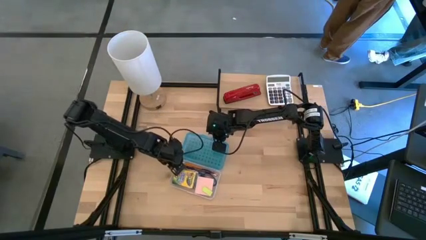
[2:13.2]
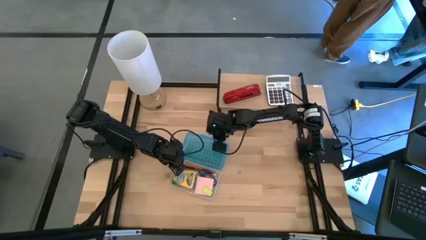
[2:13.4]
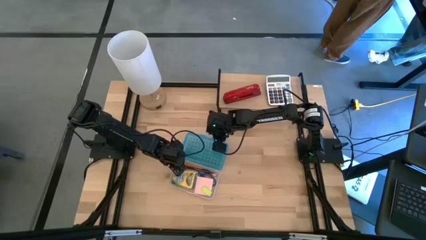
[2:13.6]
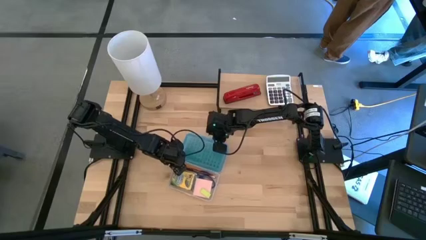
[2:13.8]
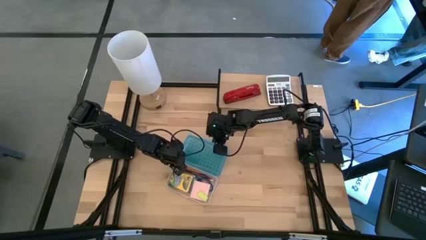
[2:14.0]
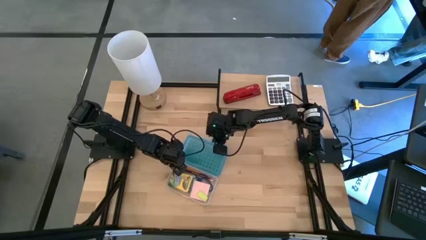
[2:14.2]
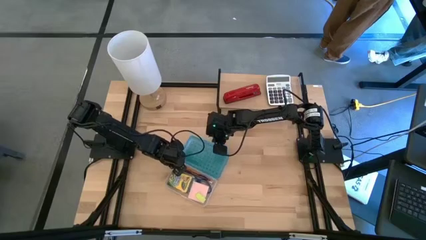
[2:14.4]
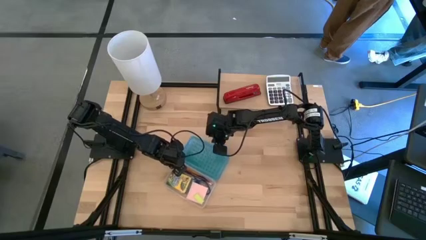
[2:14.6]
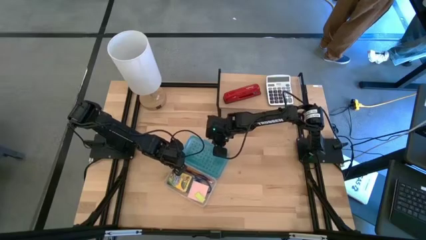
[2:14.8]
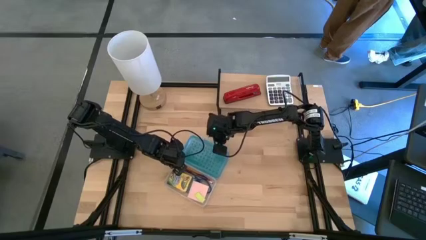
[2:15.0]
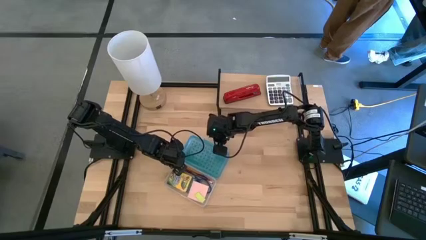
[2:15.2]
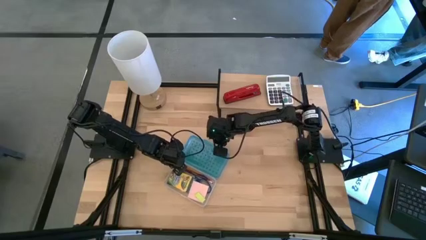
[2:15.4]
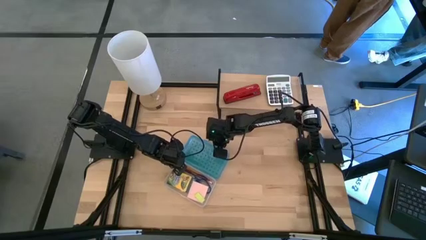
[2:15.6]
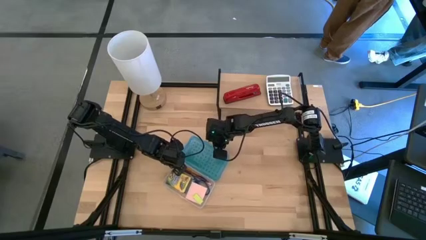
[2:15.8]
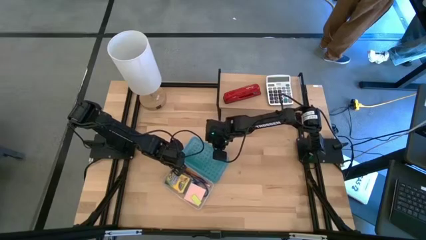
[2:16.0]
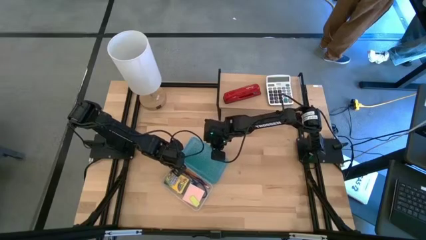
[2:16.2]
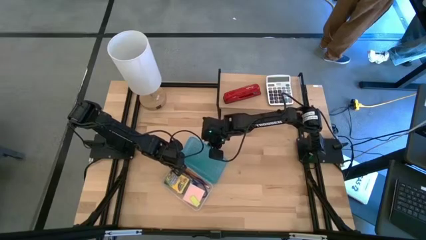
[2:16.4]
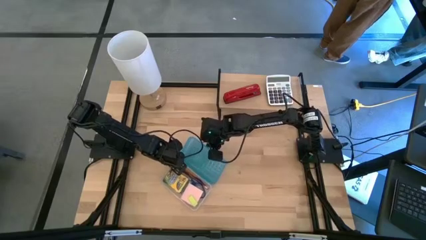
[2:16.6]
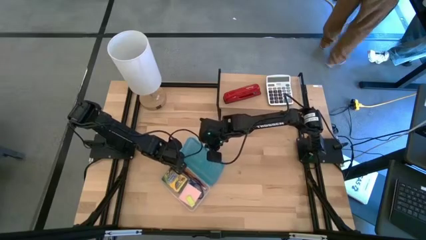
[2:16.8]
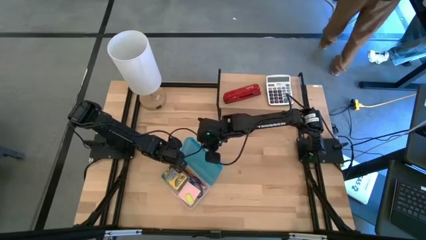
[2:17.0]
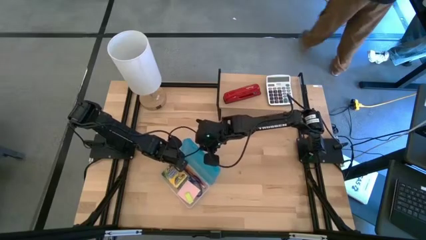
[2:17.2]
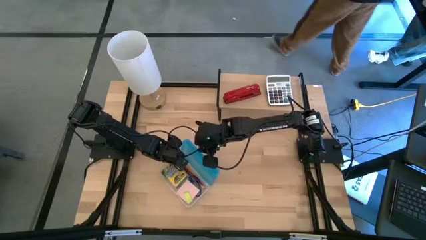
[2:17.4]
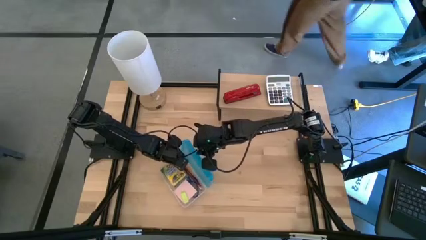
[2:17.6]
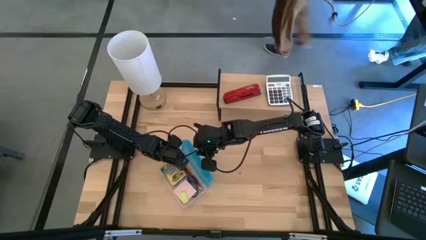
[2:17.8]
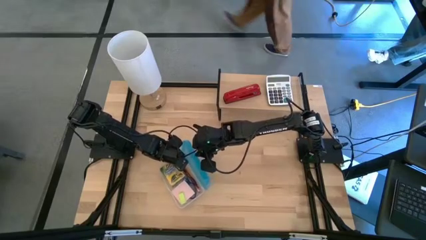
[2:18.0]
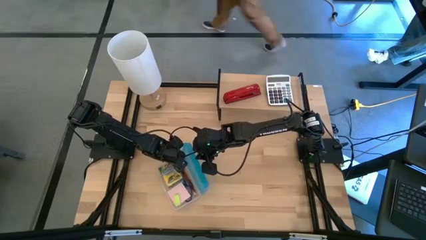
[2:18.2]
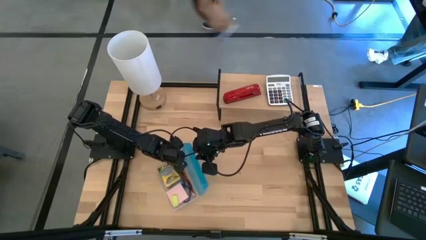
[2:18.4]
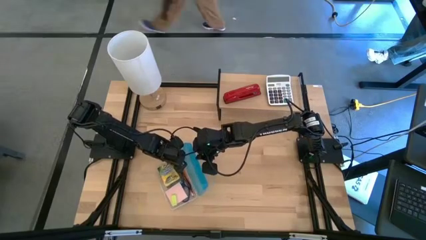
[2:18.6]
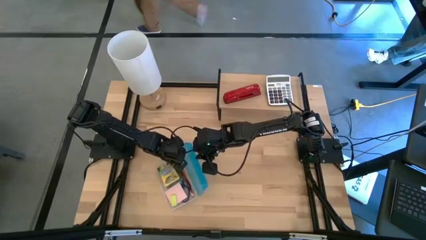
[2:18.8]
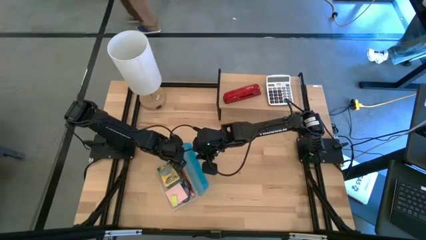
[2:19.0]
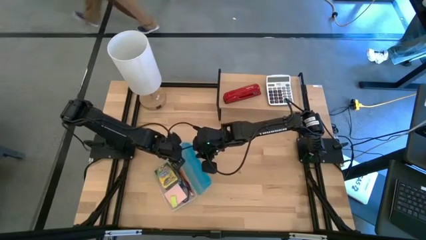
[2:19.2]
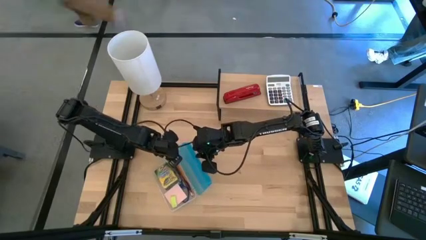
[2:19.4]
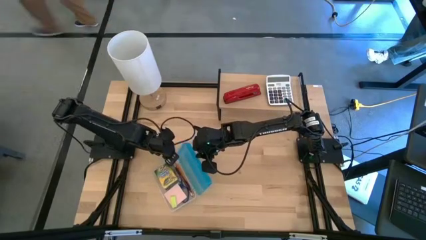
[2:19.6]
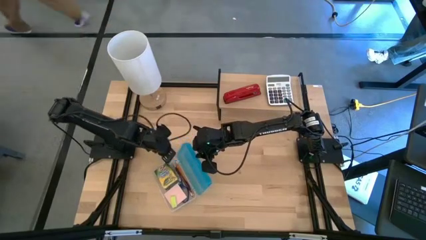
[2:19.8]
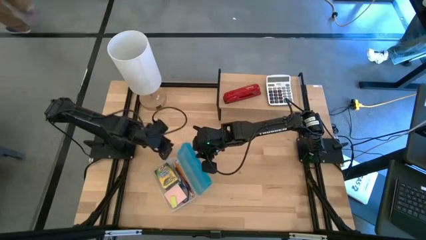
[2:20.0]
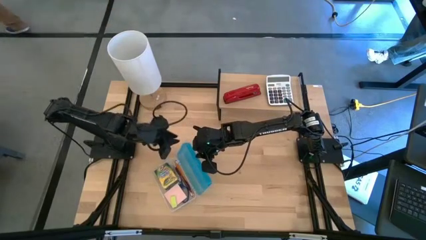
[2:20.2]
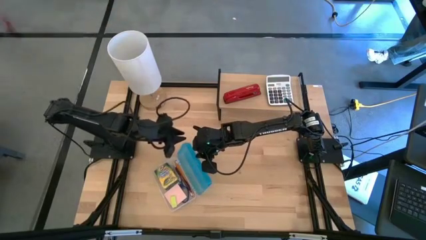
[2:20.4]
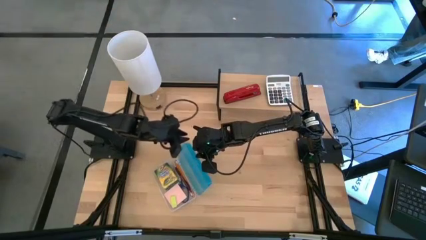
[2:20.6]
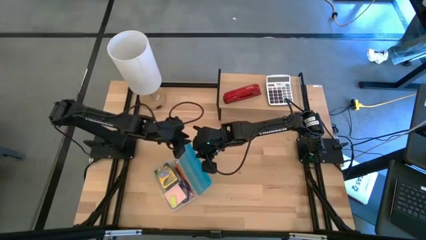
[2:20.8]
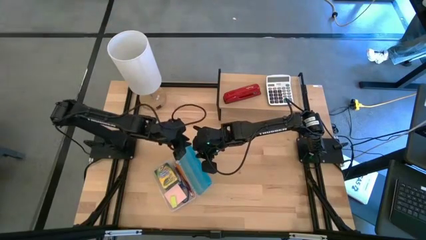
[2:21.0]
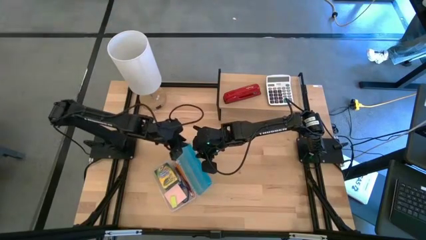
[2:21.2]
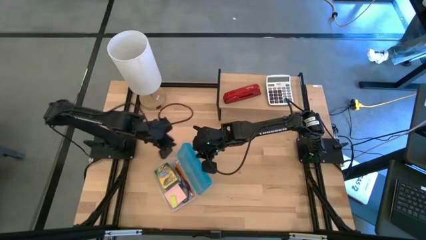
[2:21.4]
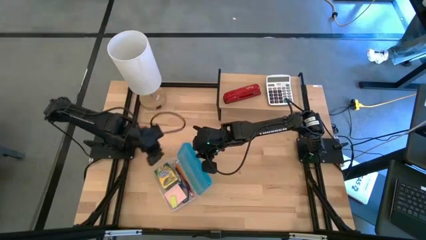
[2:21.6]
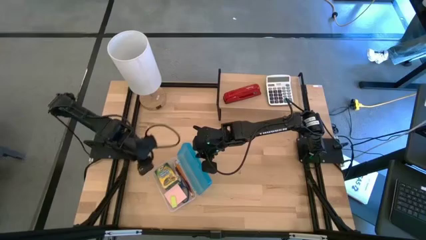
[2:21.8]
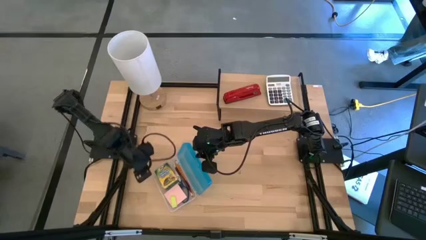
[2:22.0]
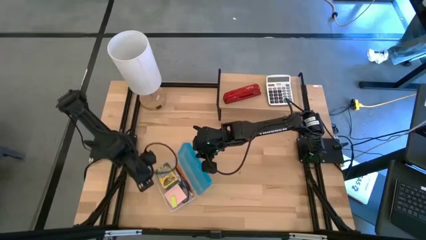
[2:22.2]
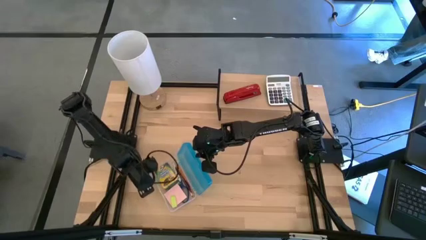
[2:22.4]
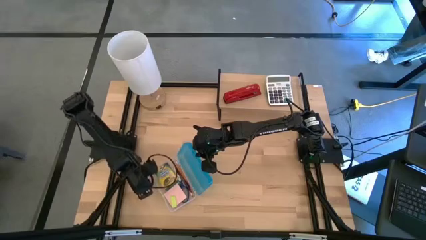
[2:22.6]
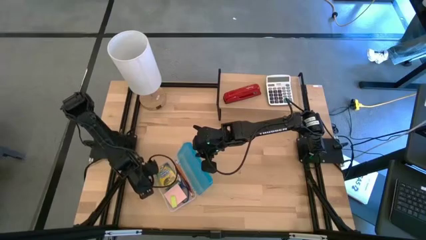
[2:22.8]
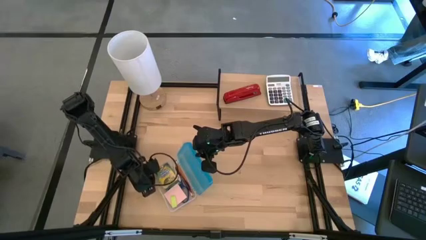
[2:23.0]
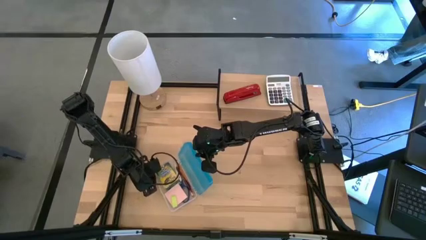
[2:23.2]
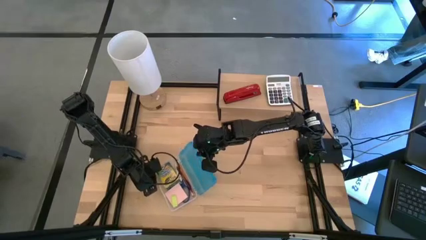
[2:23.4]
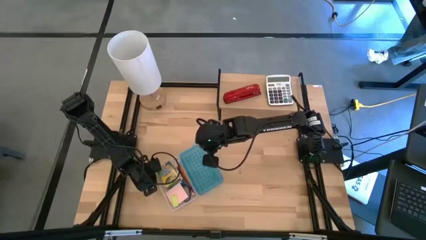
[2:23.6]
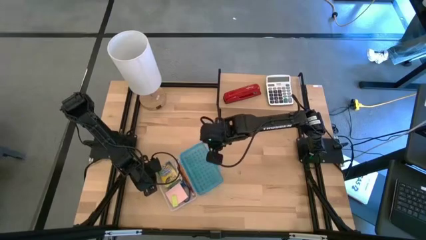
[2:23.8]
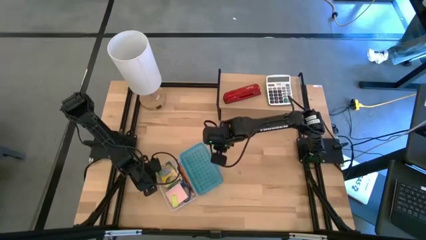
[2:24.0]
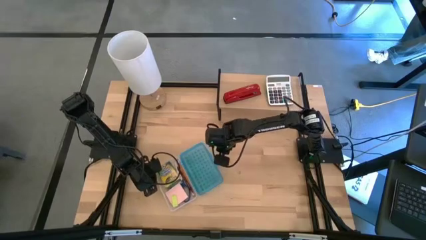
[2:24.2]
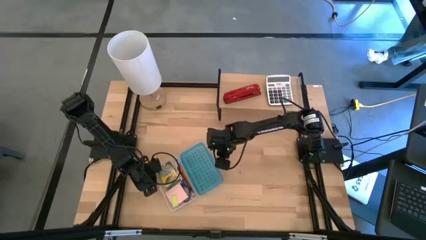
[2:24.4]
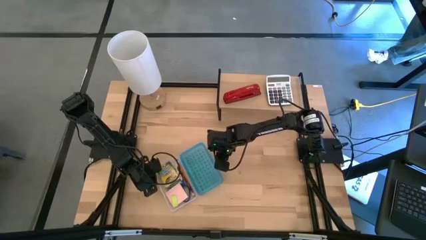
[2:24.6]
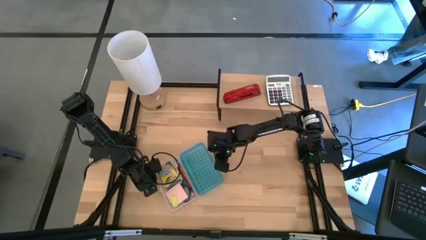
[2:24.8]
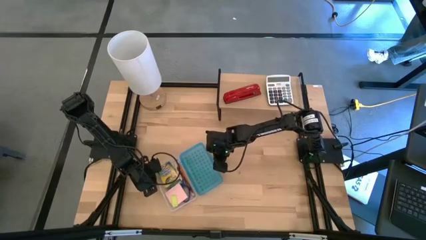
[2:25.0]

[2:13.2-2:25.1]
Task: Pack school essentials
Close the blue supply box

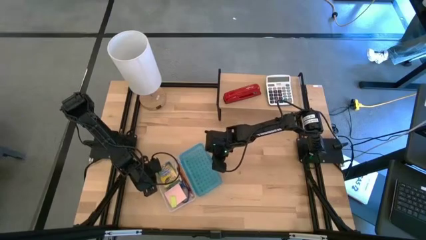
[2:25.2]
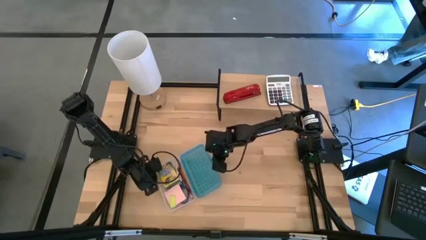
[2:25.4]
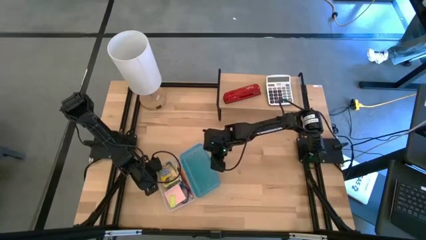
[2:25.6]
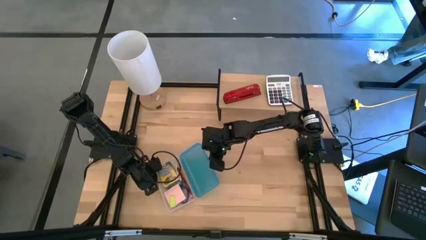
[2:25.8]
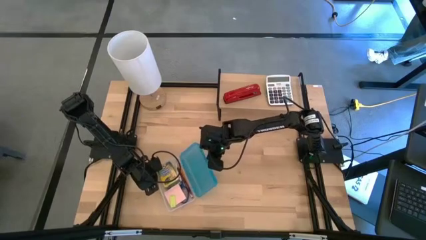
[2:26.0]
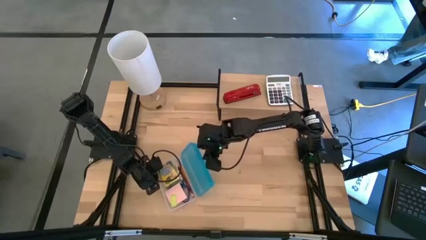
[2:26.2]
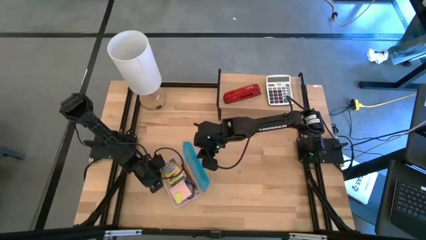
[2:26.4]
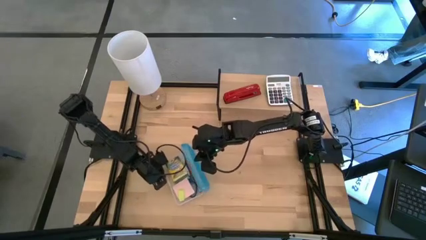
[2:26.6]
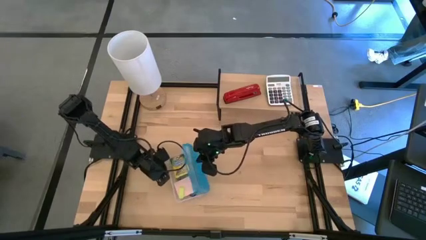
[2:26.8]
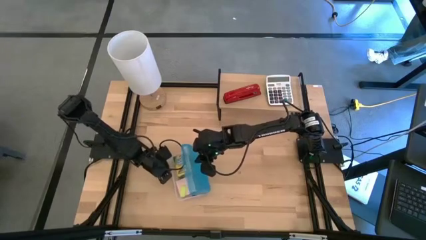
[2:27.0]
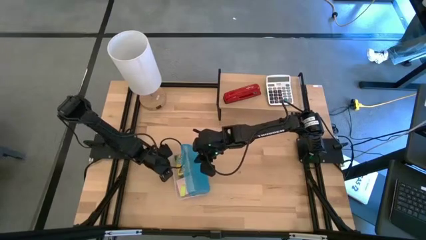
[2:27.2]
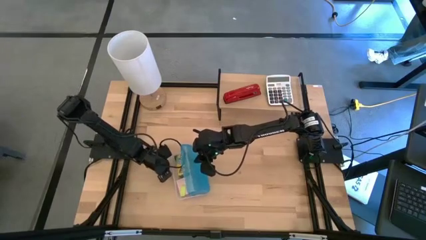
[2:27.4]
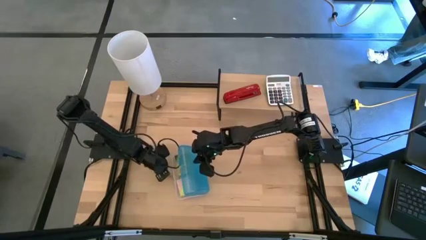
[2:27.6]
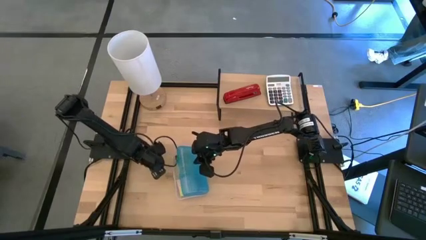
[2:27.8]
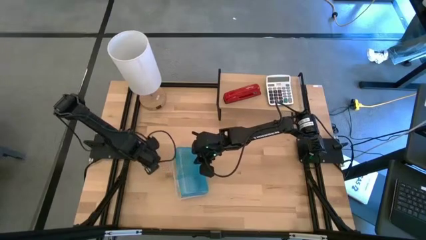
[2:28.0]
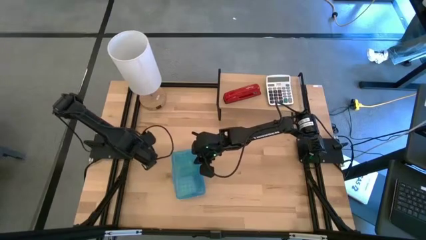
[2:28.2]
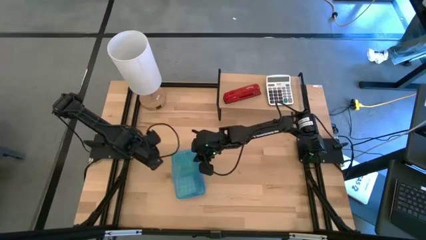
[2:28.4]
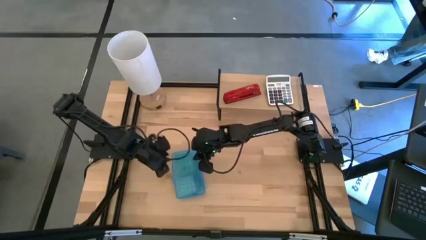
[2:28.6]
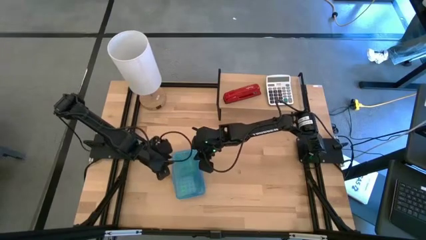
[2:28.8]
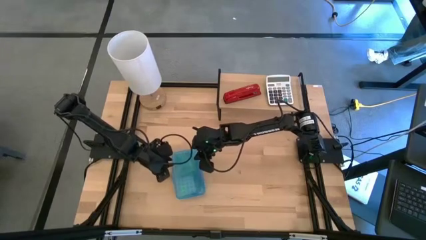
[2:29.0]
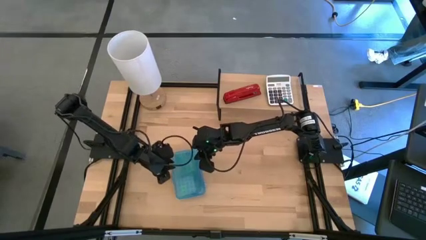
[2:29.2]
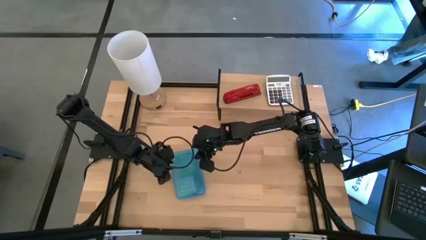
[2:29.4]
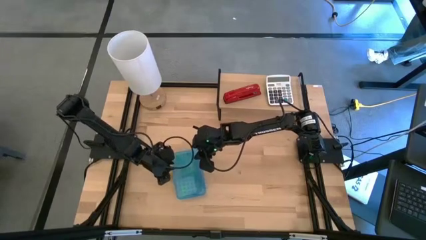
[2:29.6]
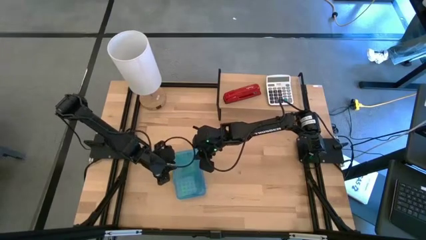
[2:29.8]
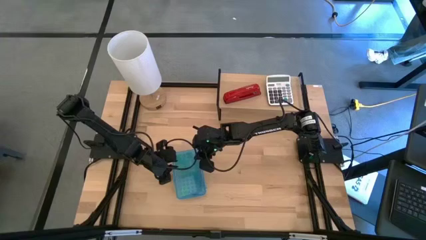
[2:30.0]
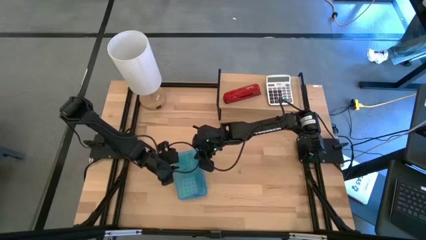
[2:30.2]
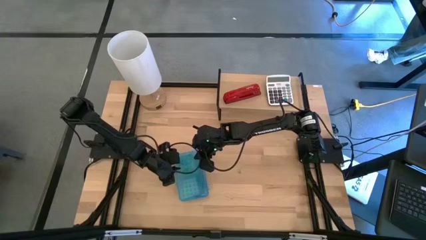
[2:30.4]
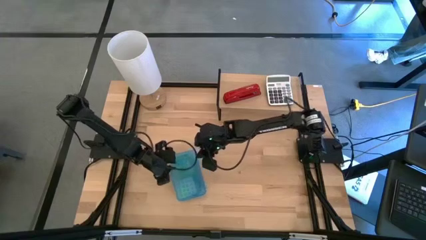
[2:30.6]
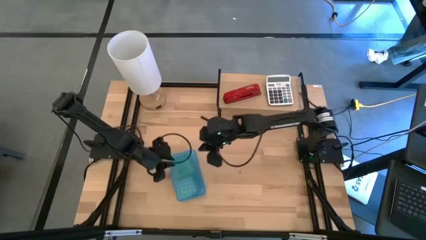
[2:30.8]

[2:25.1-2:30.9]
Close the blue supply box
